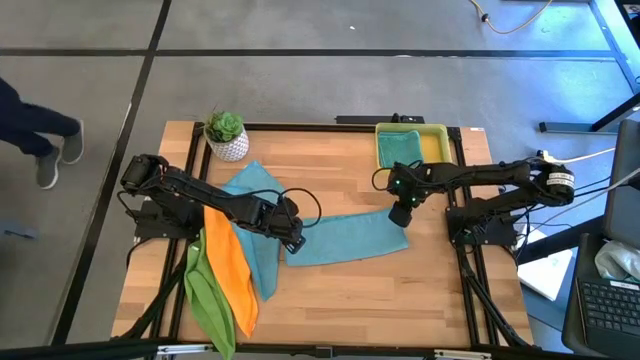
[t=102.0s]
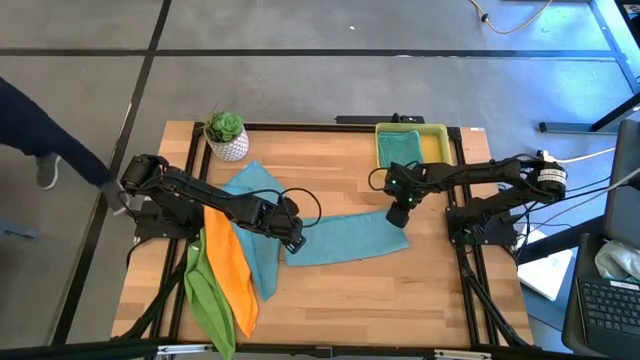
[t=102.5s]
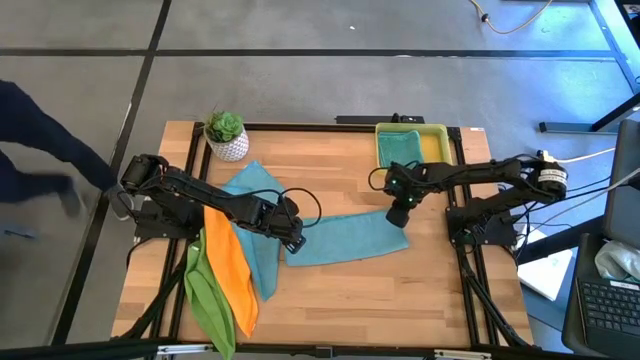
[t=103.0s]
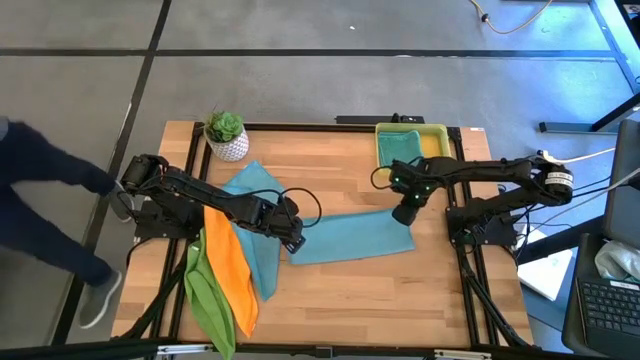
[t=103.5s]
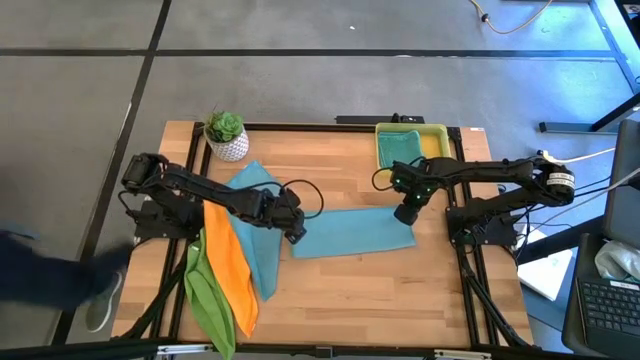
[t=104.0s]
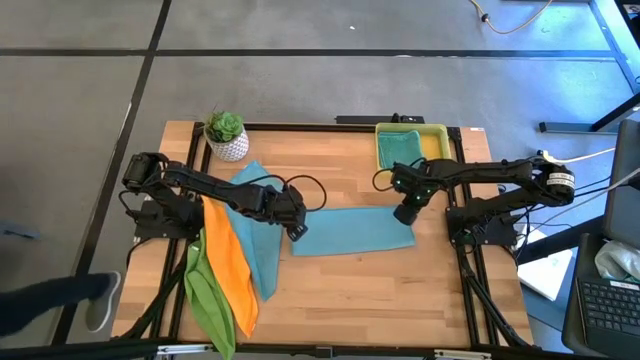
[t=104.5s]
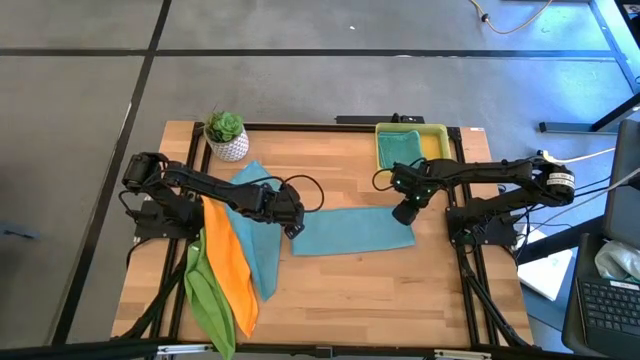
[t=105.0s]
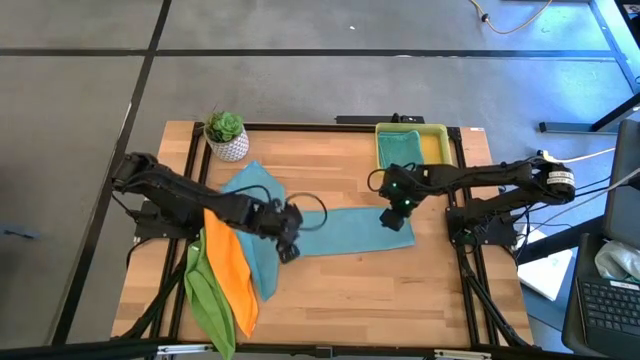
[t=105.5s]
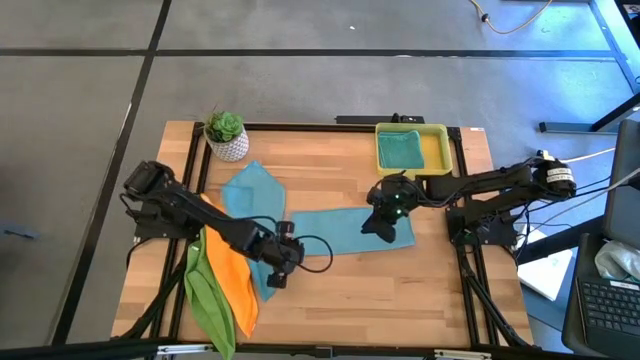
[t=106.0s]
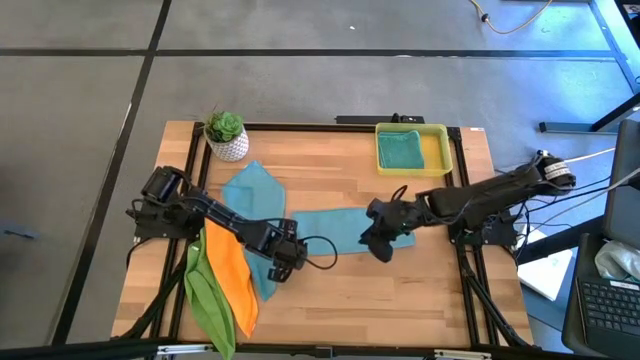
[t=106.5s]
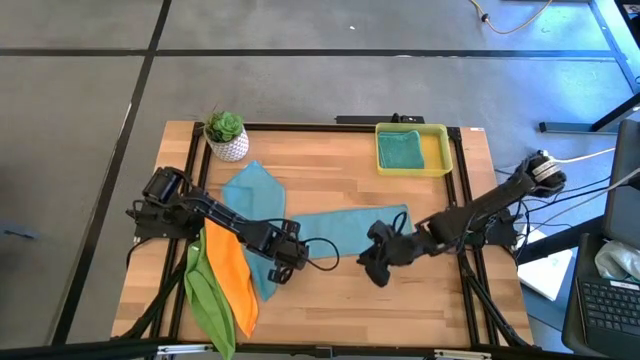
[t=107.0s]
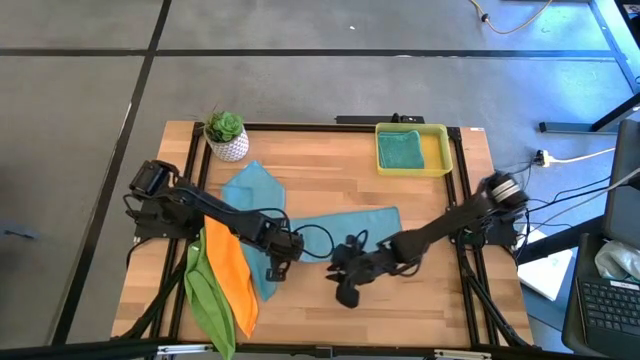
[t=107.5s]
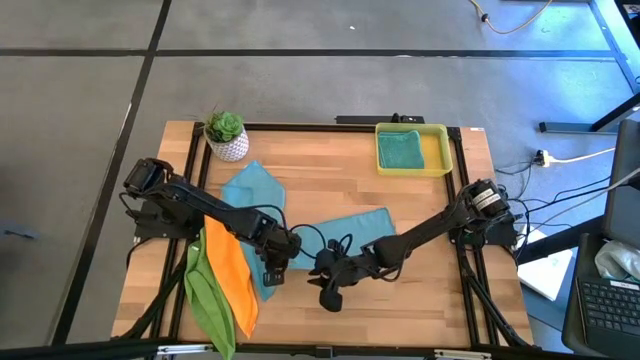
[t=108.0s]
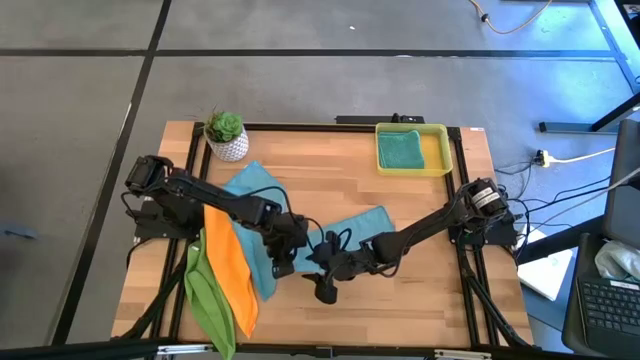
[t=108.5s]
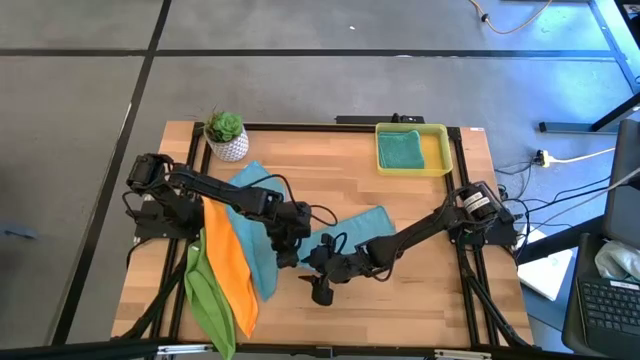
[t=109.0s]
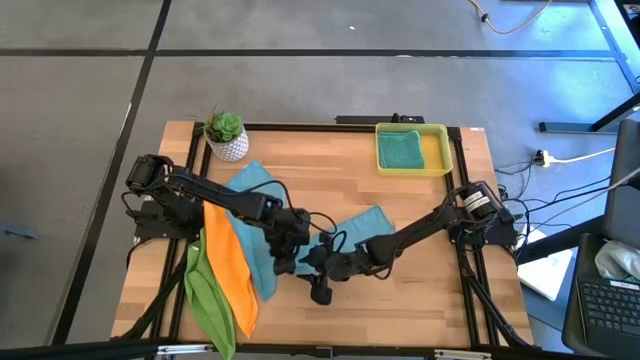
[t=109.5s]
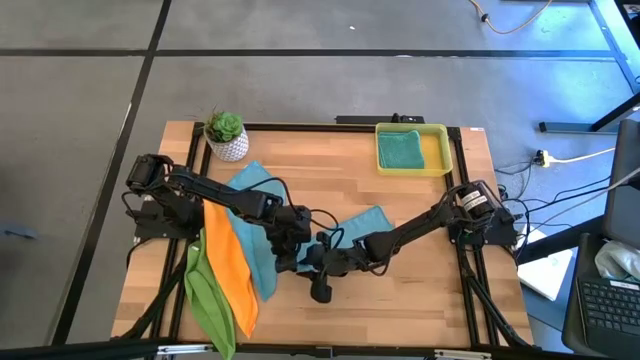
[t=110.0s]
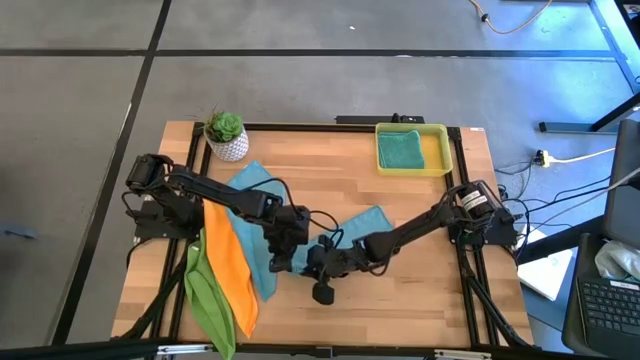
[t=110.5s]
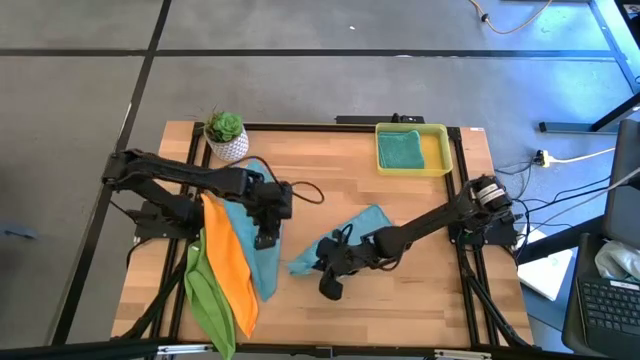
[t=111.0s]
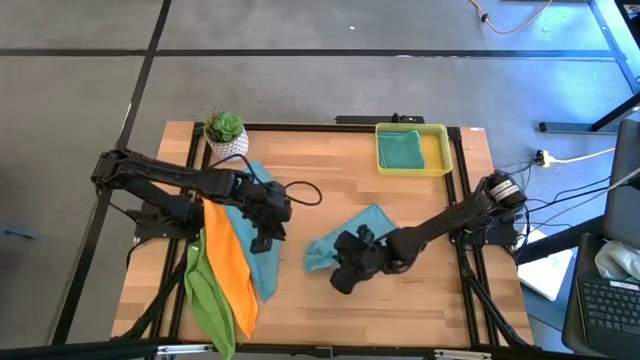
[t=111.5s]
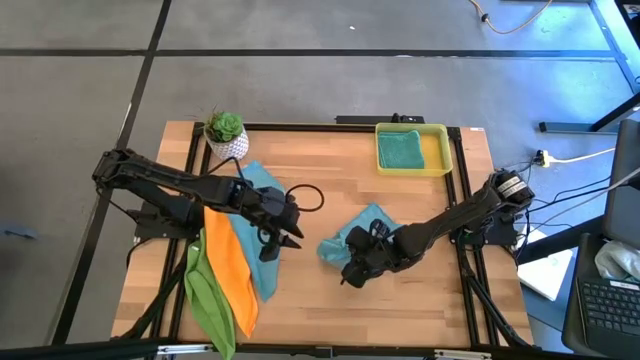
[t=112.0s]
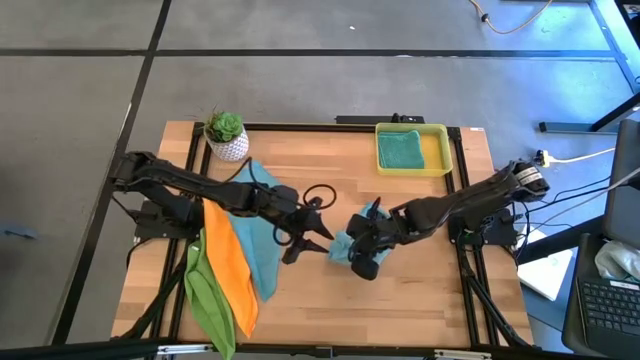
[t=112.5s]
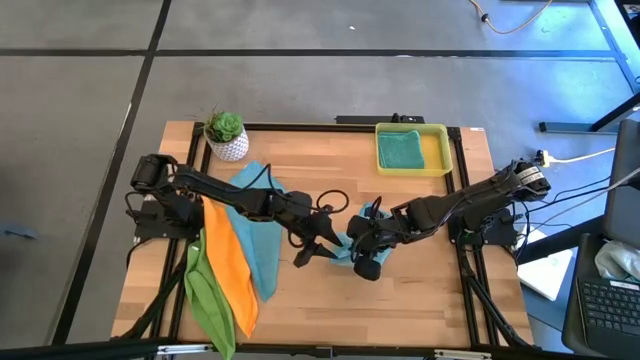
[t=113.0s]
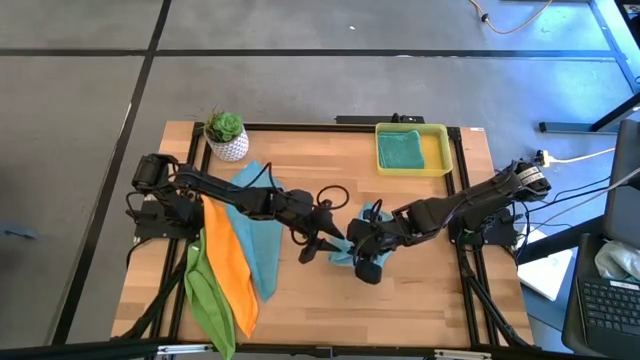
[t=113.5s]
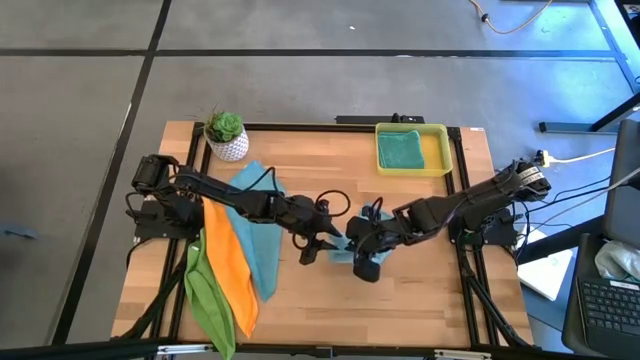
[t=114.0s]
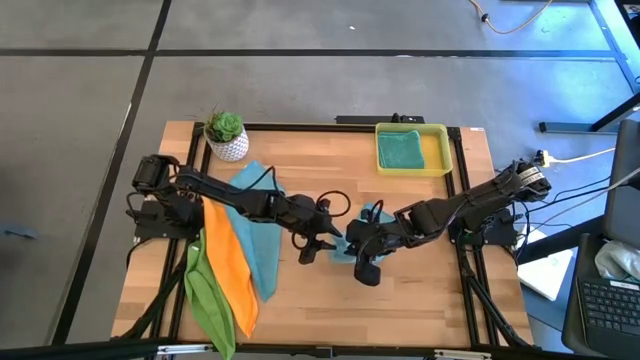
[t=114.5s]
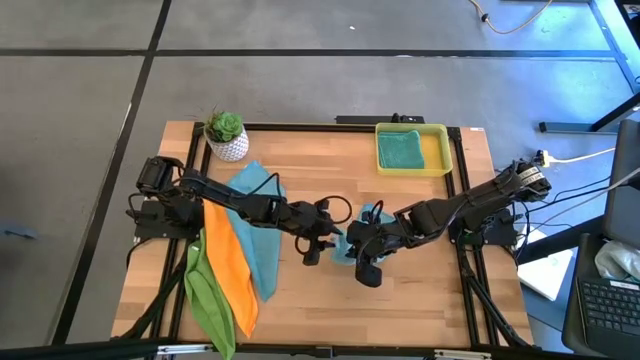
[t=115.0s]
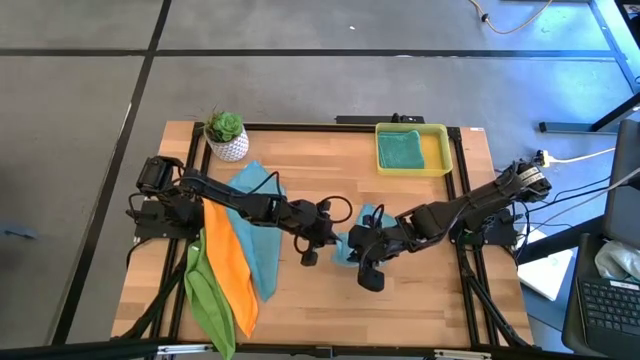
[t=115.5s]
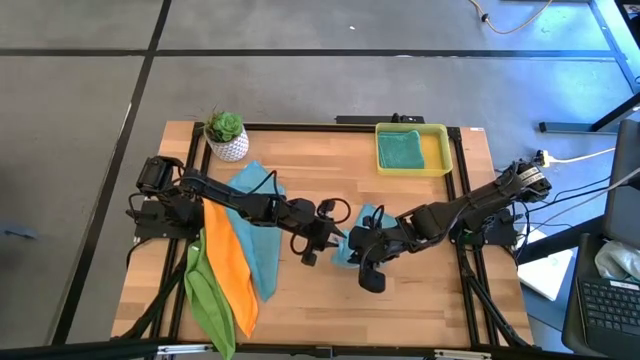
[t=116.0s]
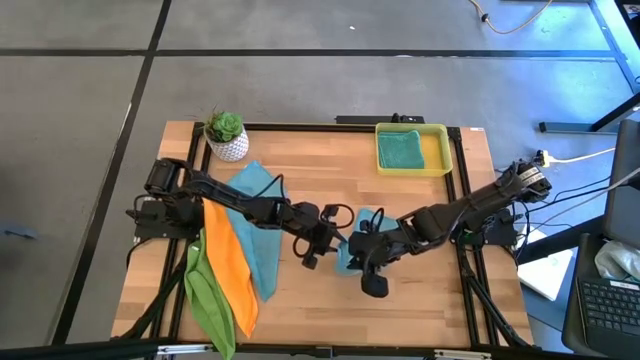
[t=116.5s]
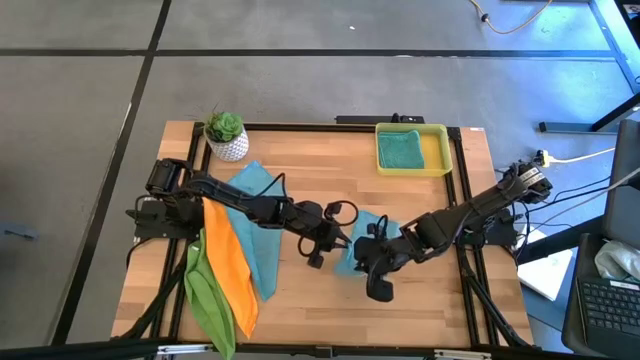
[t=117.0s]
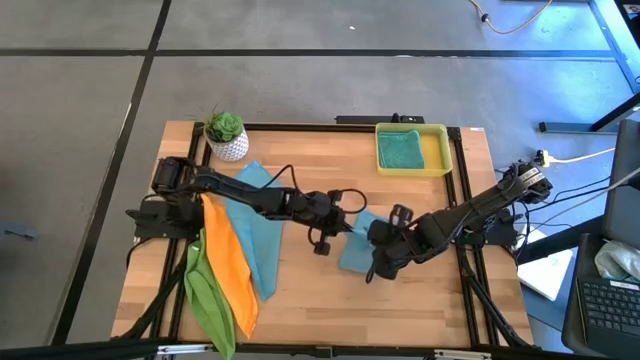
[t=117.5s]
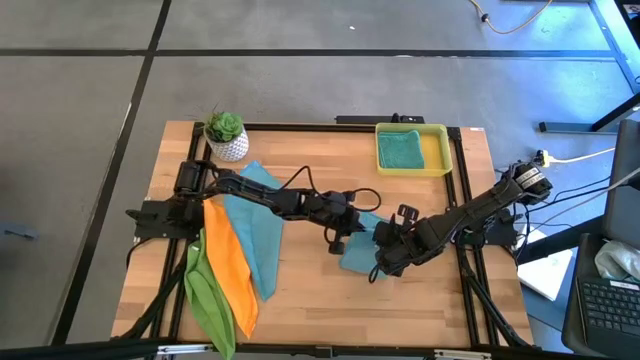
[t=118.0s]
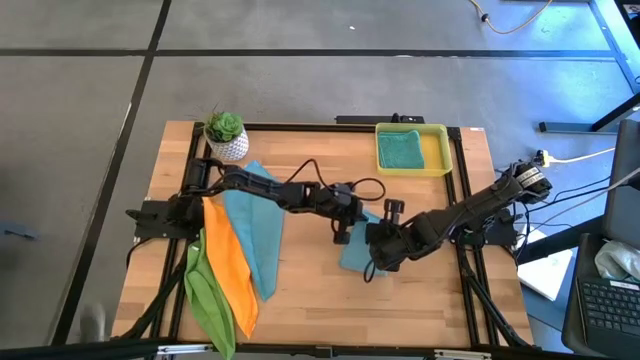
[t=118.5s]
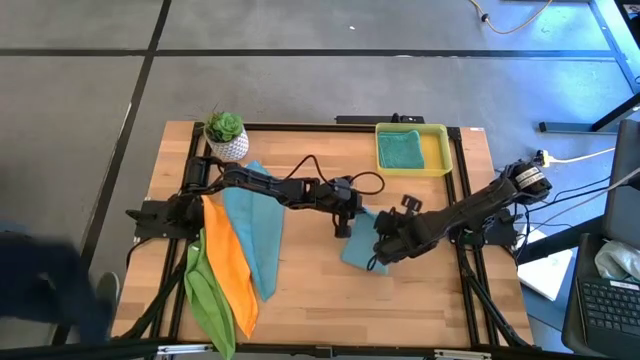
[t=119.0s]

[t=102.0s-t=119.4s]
Task: Fold microfiber towels
Fold the right blue microfiber towel

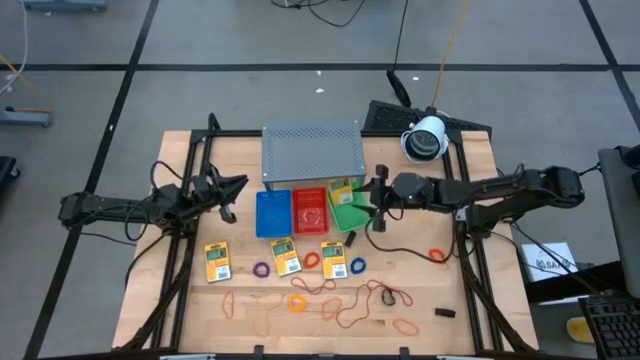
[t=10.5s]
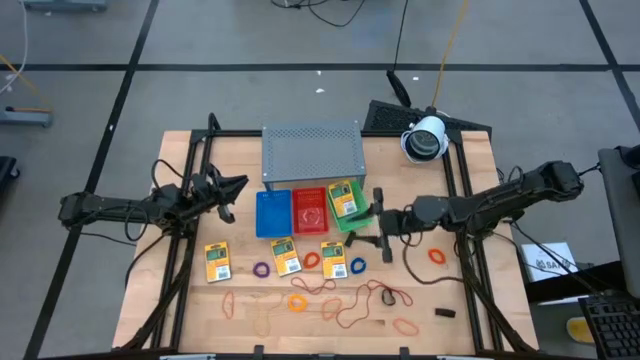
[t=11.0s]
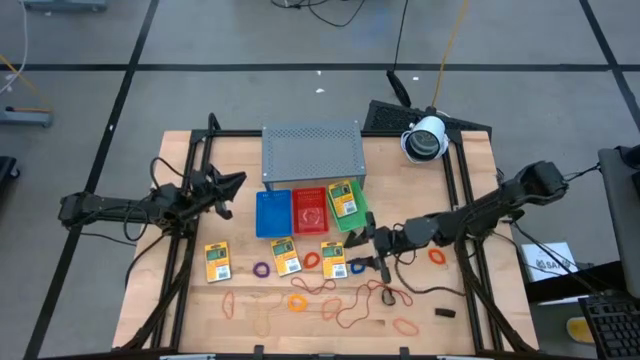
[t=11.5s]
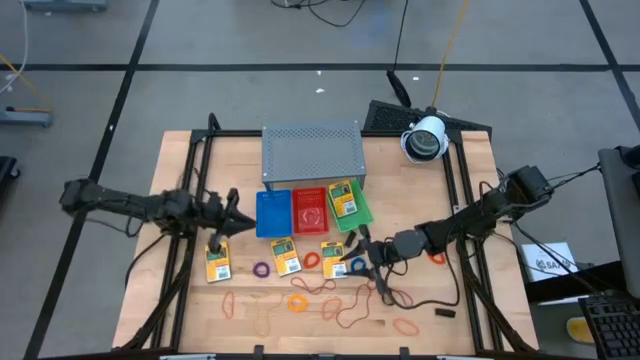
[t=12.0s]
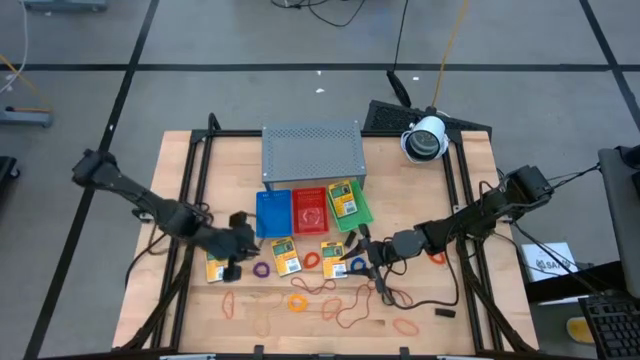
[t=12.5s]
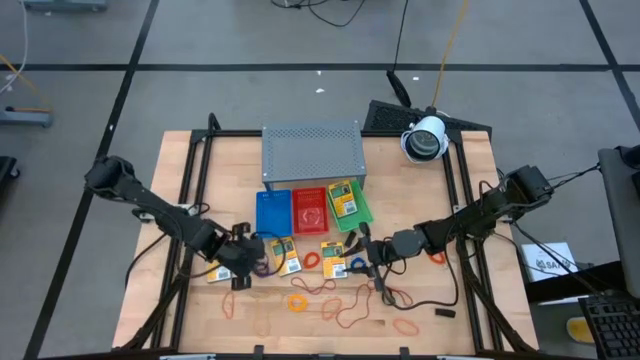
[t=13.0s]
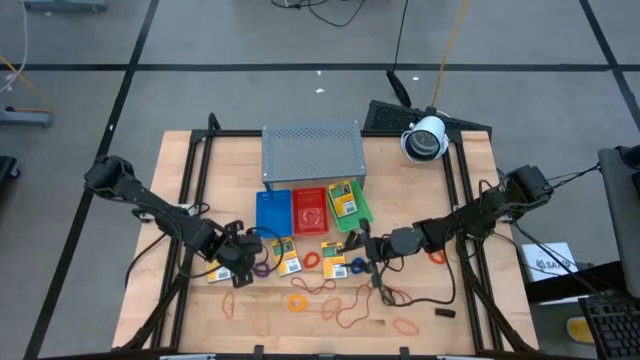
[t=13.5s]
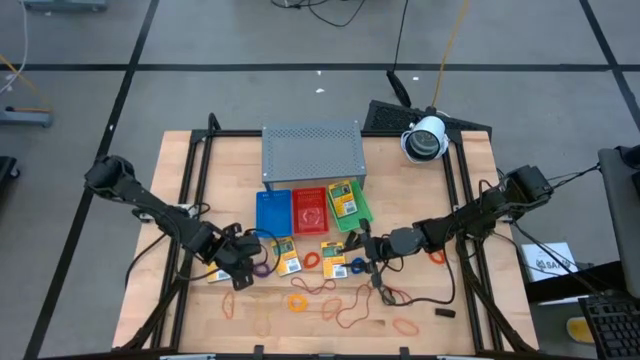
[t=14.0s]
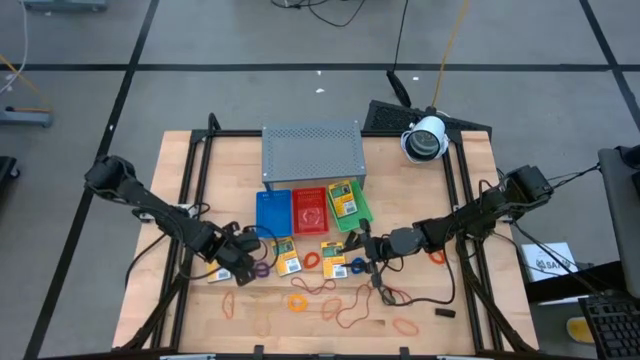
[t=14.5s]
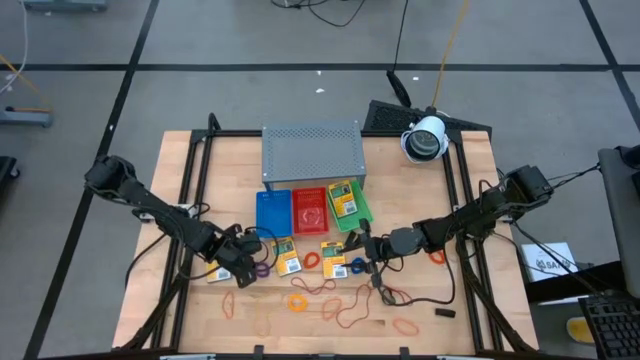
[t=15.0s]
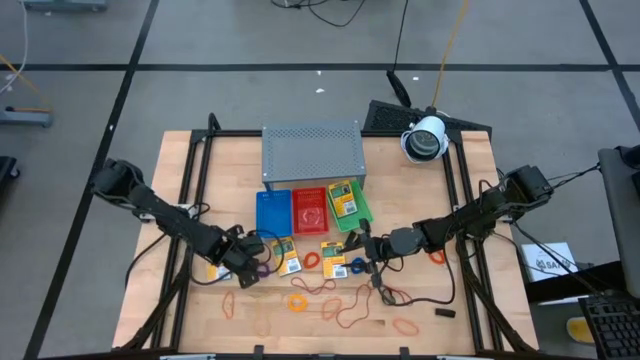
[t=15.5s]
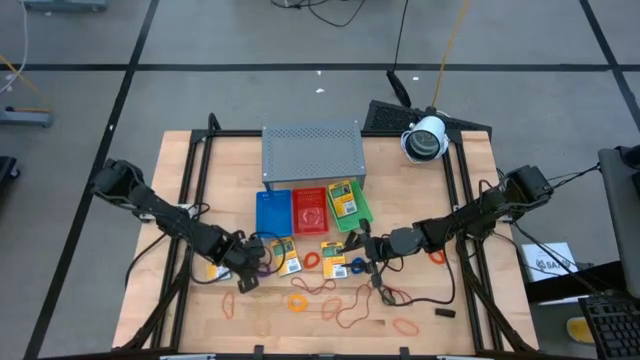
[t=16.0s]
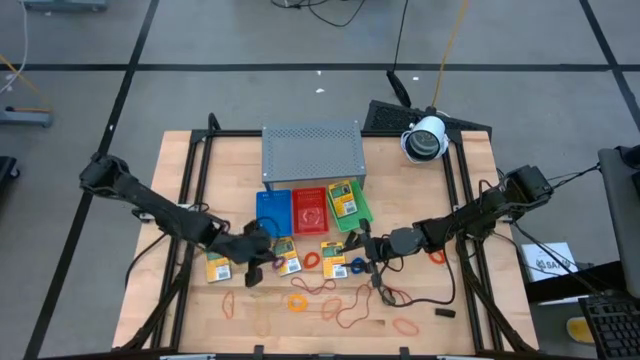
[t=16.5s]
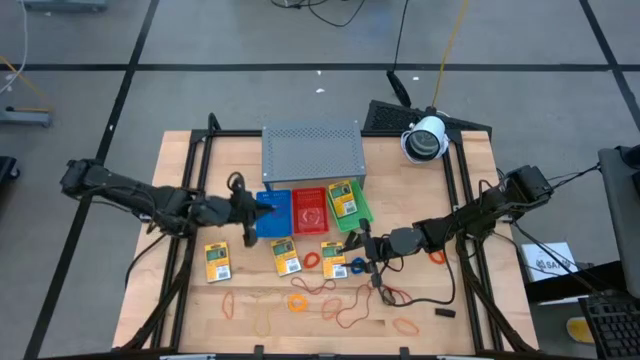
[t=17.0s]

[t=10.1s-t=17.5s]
Task: Pick & Place Office Desk Supplies
Put the purple spring keychain into the blue bin
